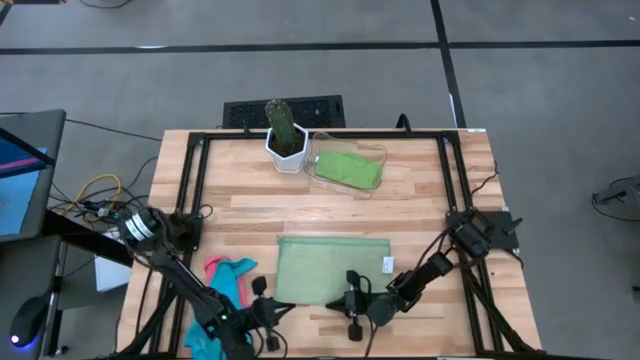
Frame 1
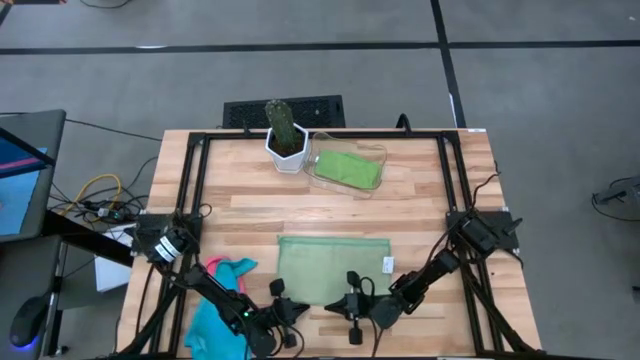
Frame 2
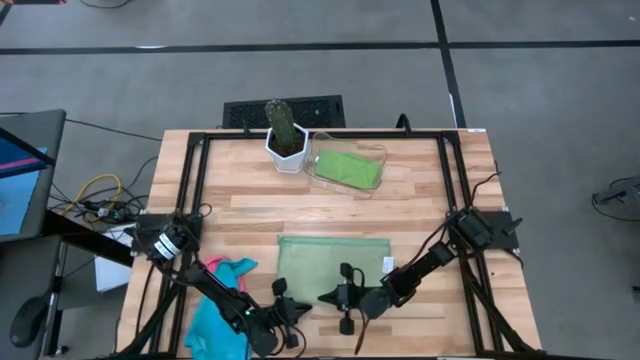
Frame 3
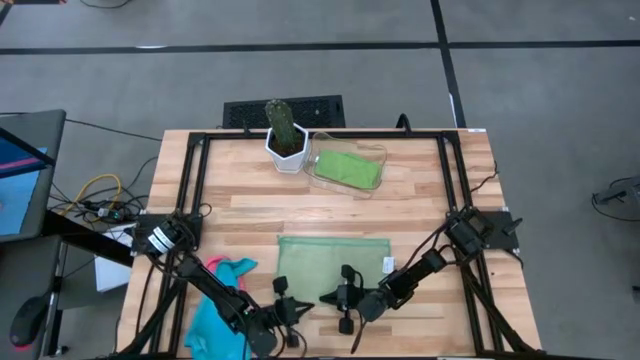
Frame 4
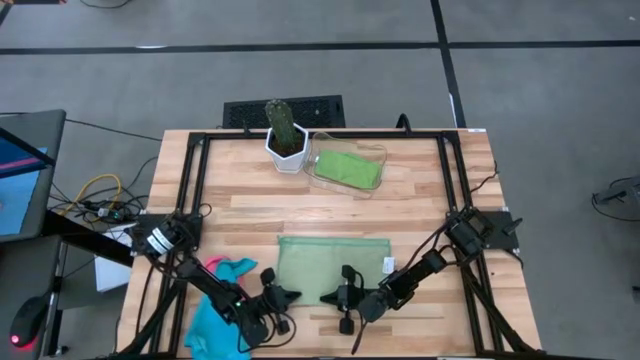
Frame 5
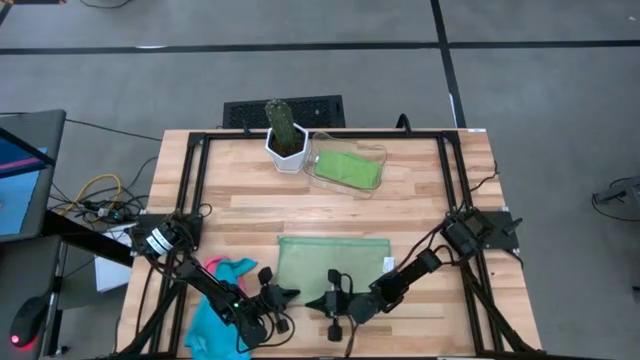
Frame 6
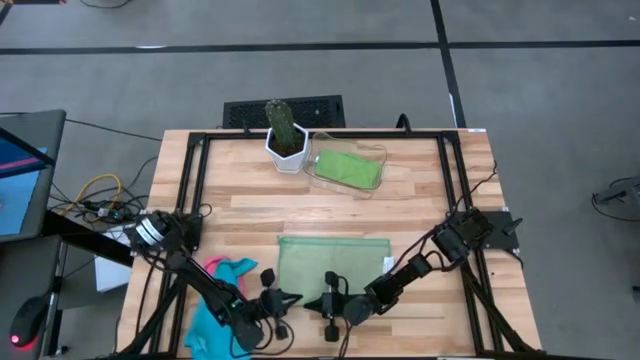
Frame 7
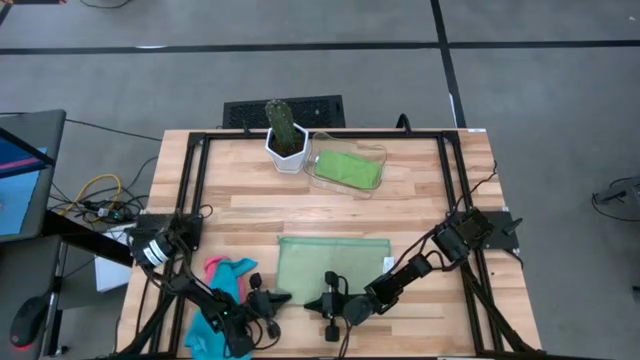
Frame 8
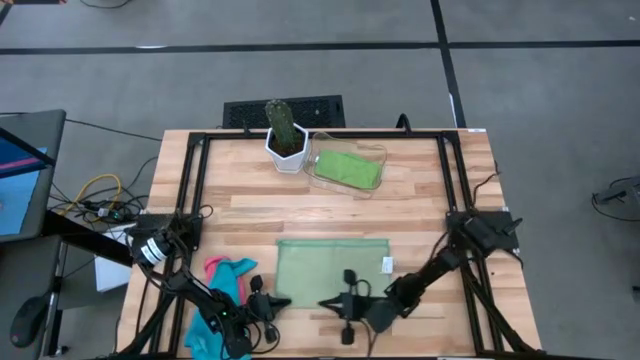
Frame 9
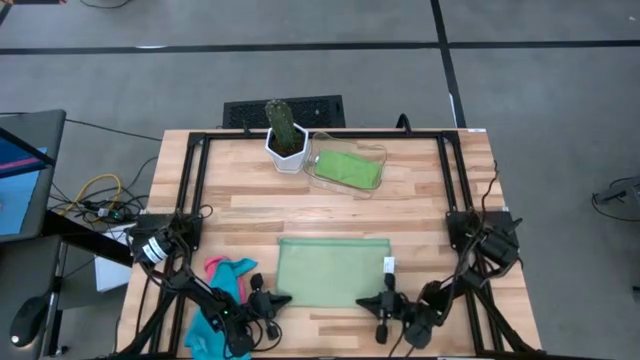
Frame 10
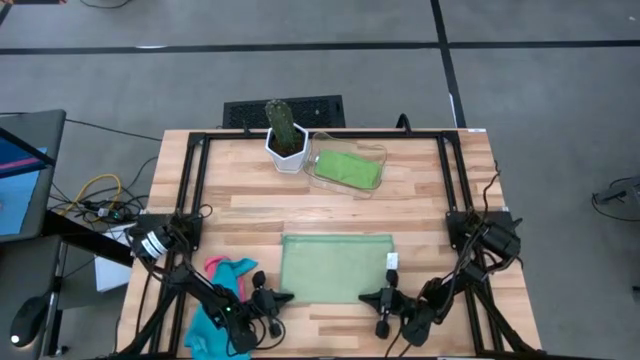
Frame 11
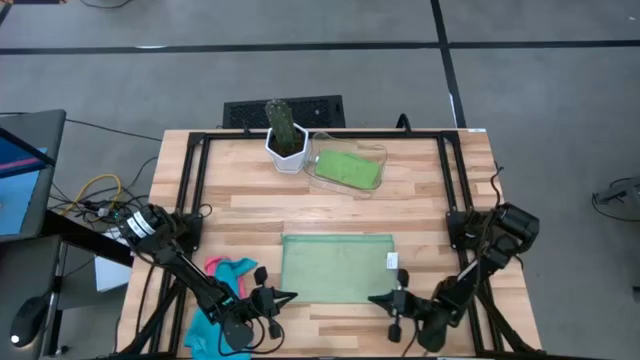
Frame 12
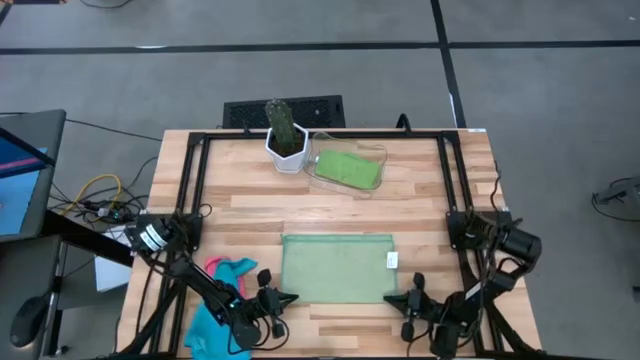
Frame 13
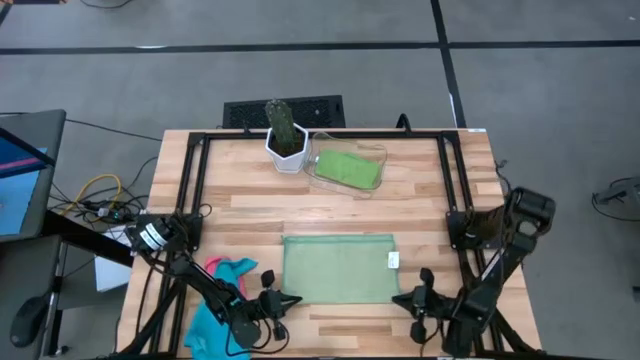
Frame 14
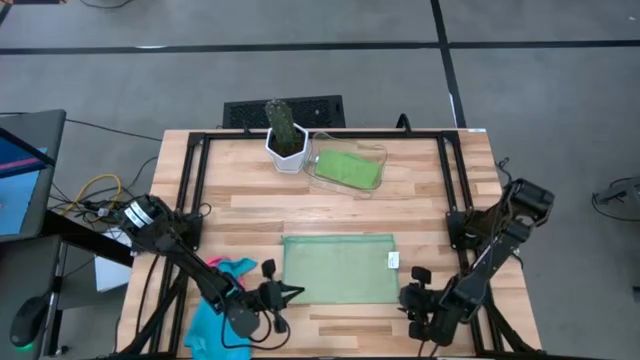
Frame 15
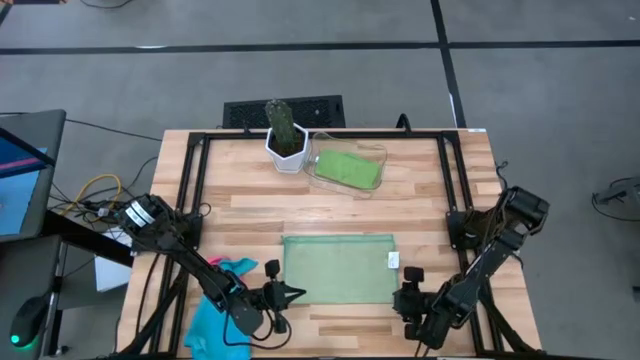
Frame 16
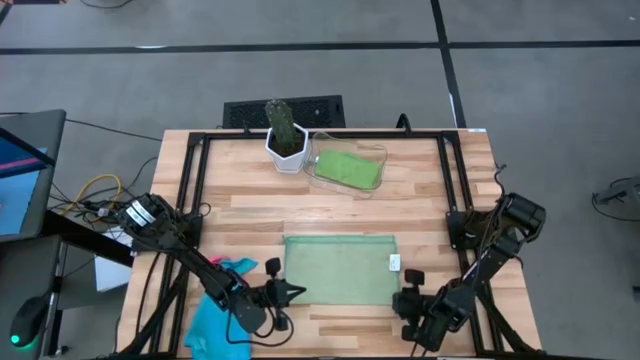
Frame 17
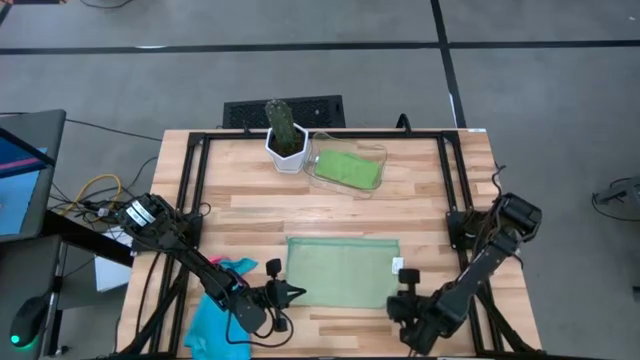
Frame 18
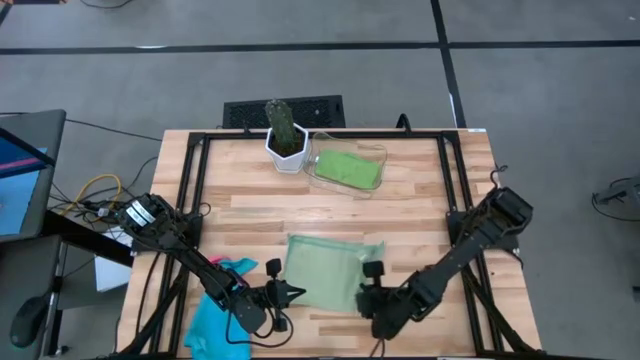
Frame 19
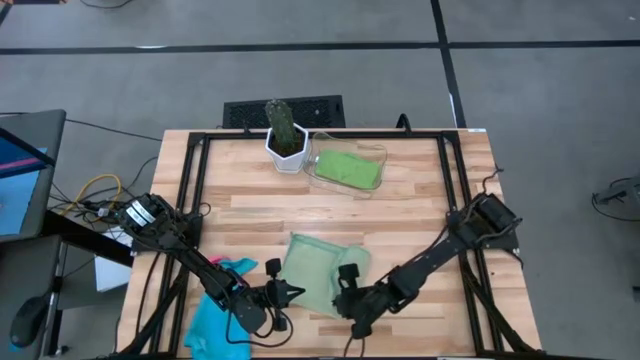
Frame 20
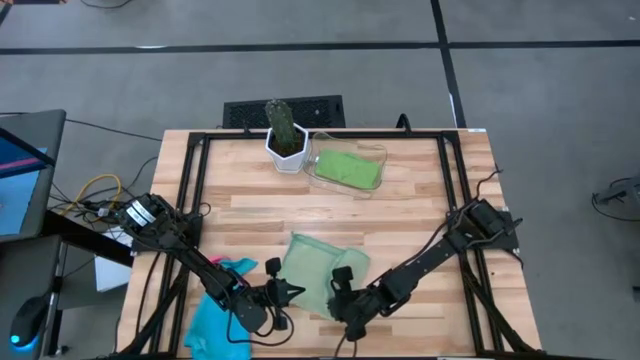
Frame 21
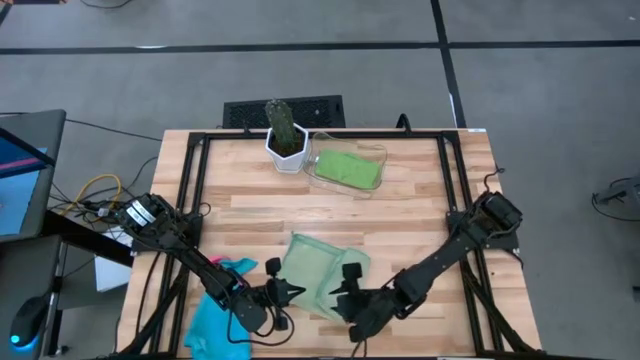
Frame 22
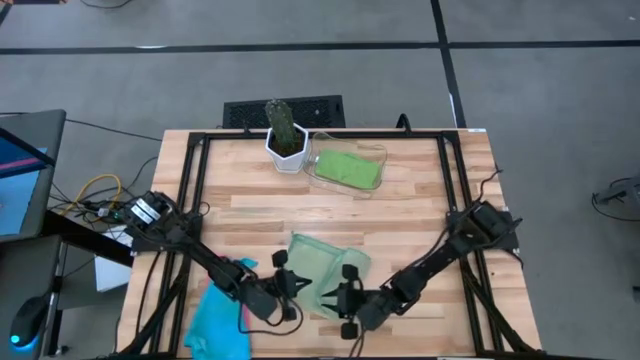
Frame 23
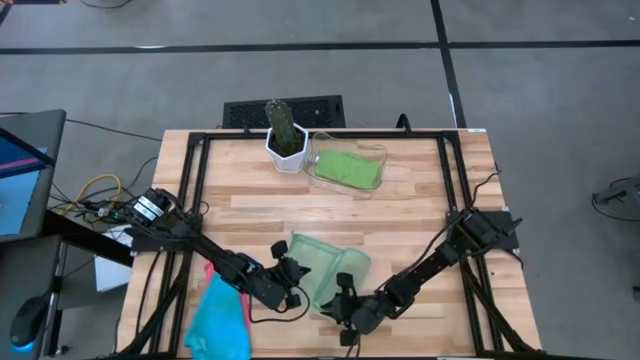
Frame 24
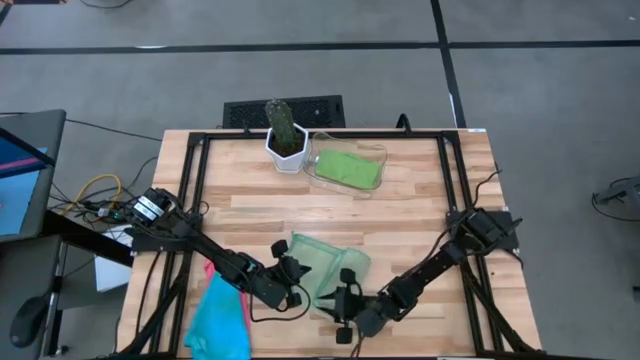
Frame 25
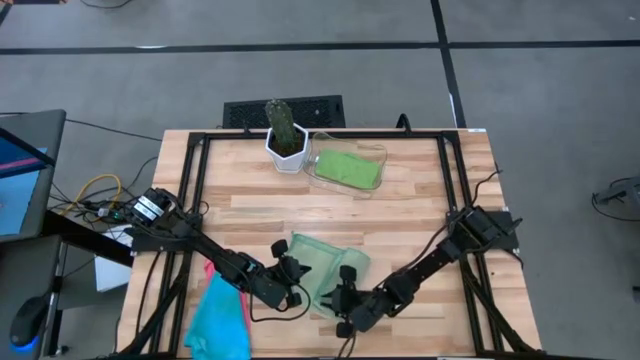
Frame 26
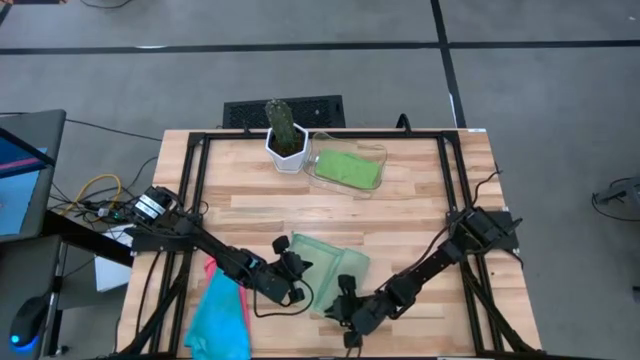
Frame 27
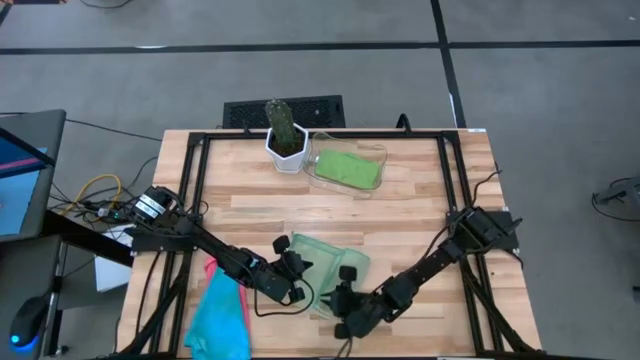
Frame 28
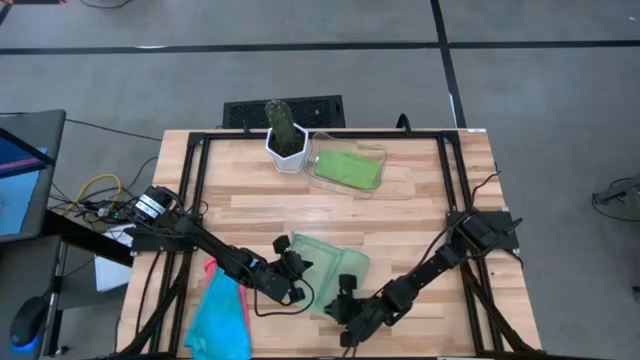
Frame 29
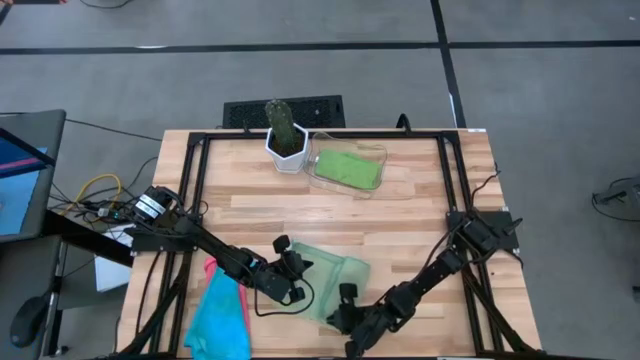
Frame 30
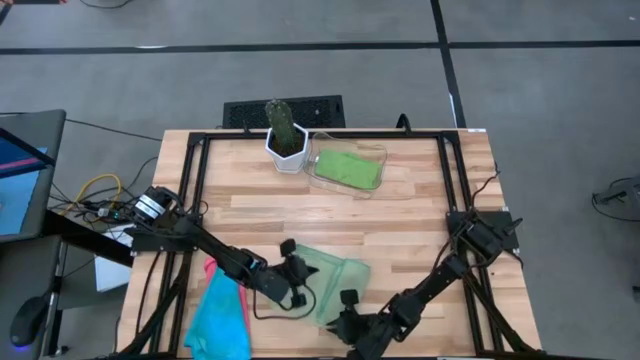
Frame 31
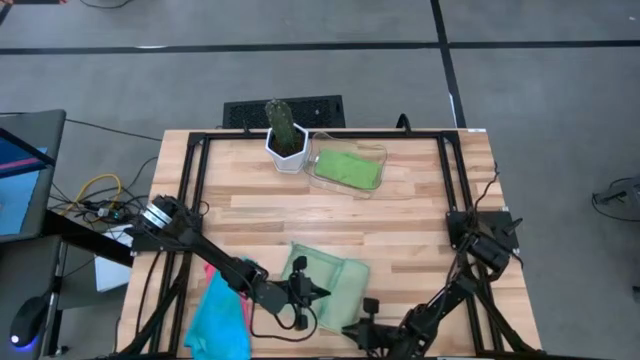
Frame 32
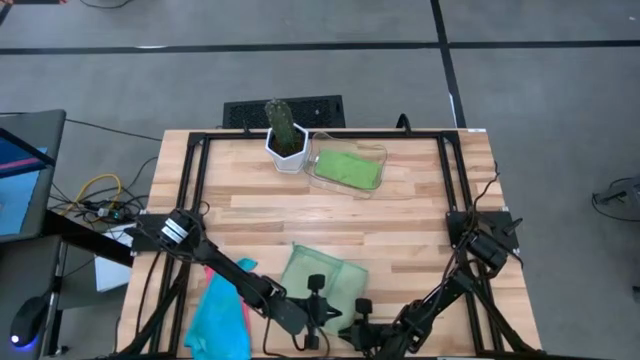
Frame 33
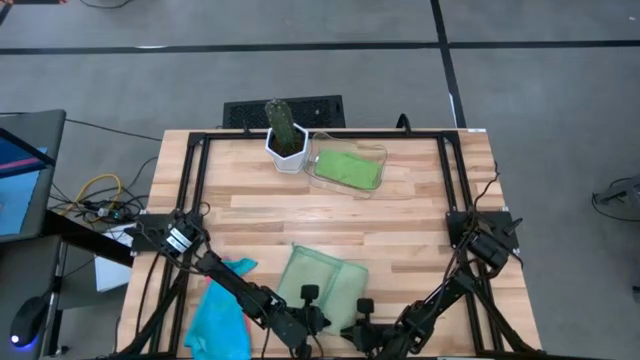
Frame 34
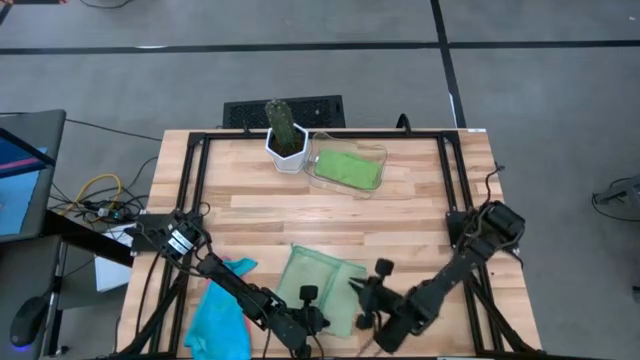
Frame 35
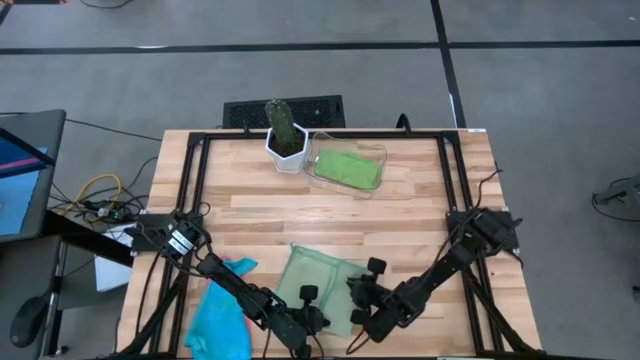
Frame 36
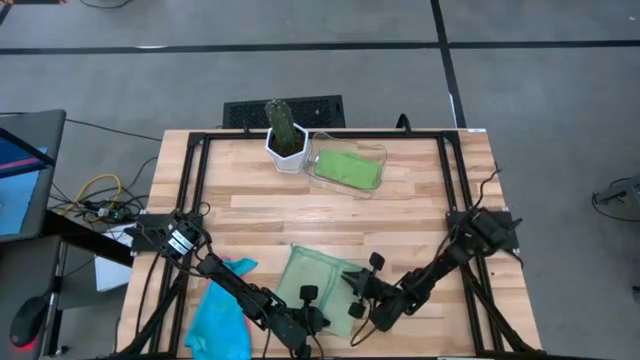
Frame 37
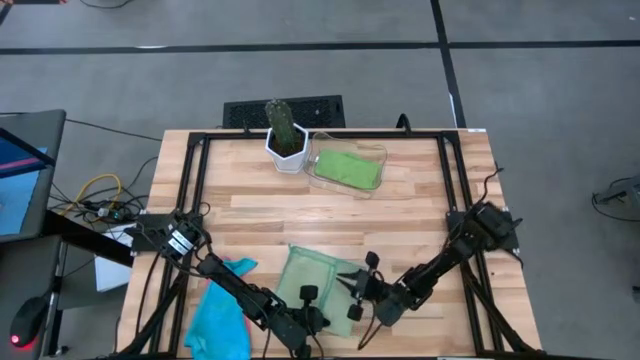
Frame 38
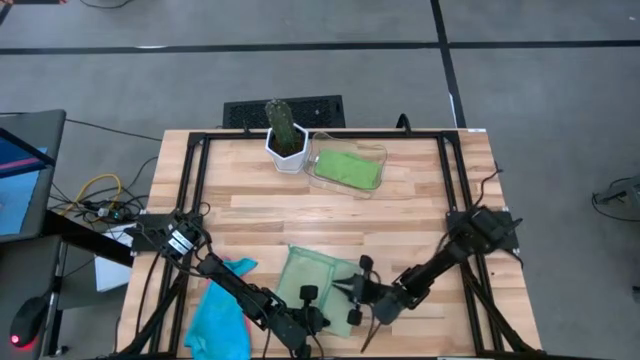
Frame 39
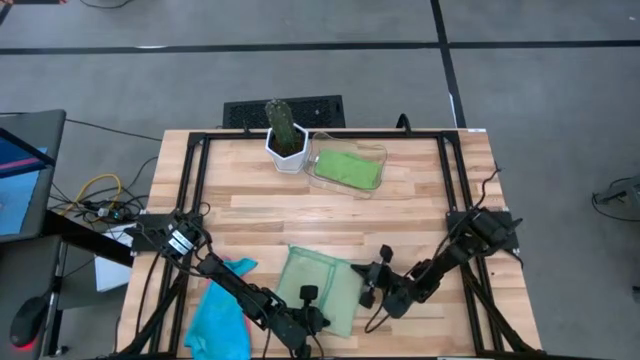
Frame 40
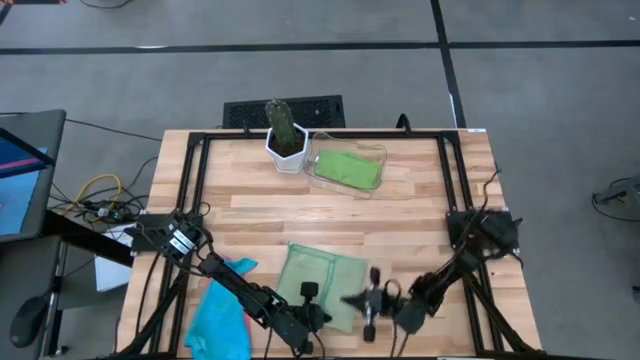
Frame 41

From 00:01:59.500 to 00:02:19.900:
Task: Fold microfiber towels
Fold the light green towel
